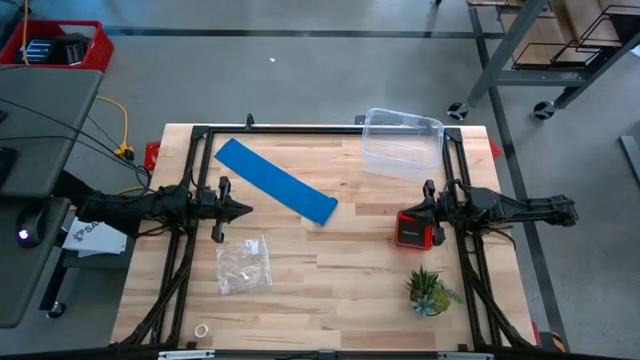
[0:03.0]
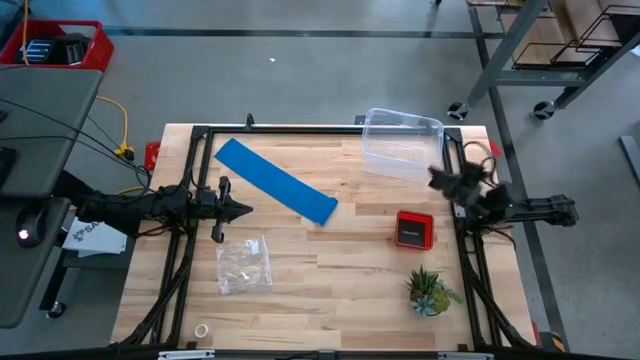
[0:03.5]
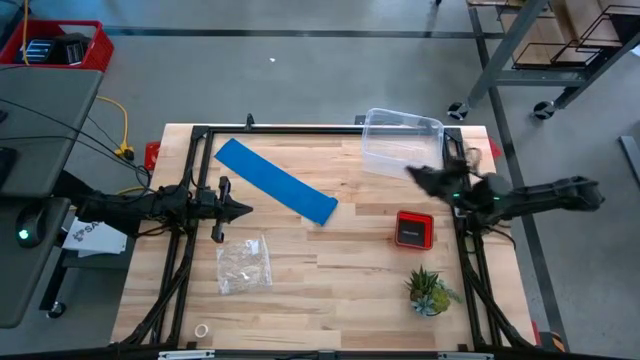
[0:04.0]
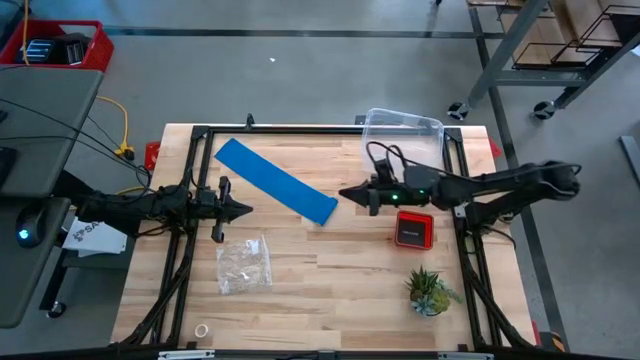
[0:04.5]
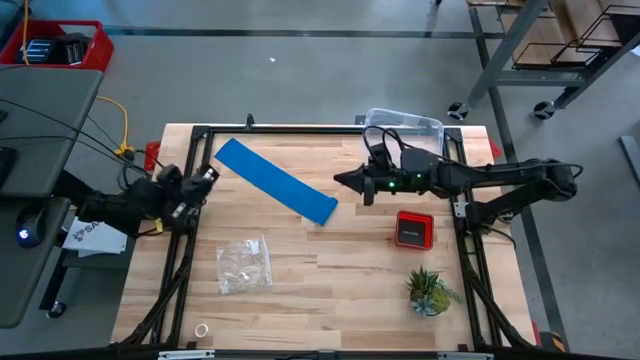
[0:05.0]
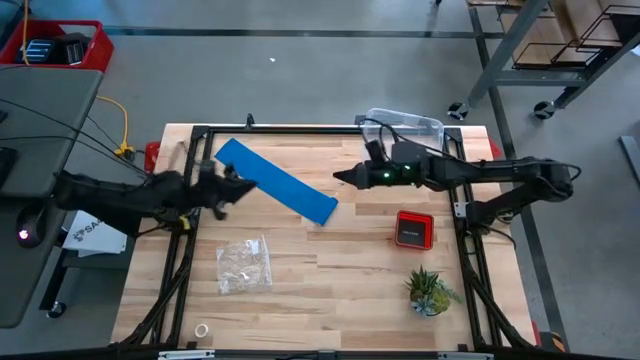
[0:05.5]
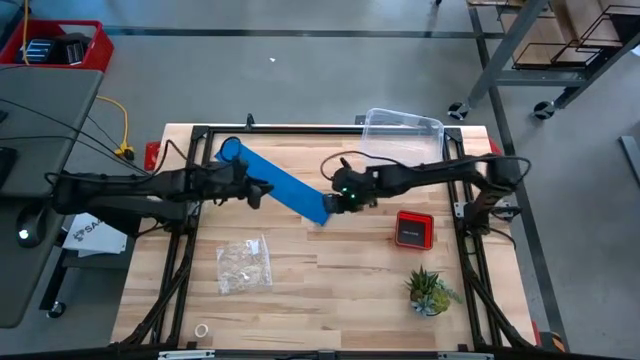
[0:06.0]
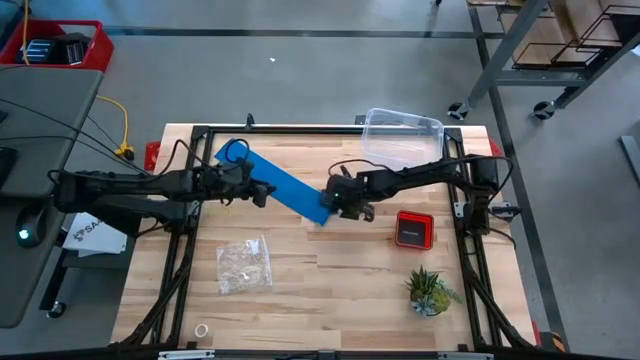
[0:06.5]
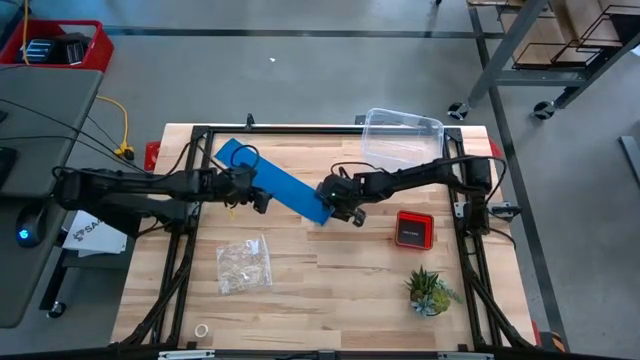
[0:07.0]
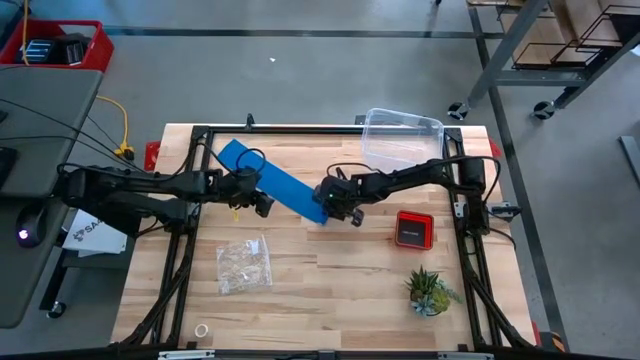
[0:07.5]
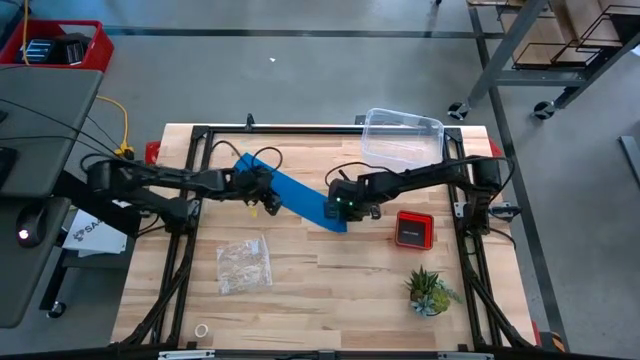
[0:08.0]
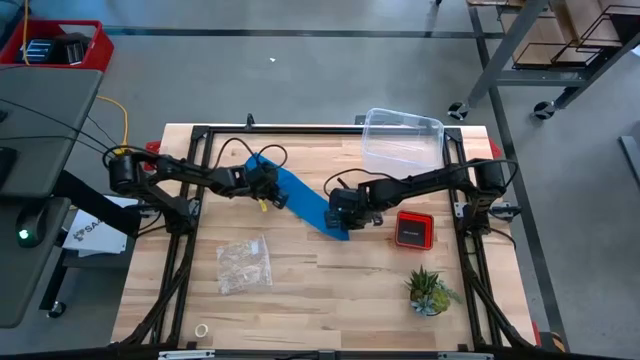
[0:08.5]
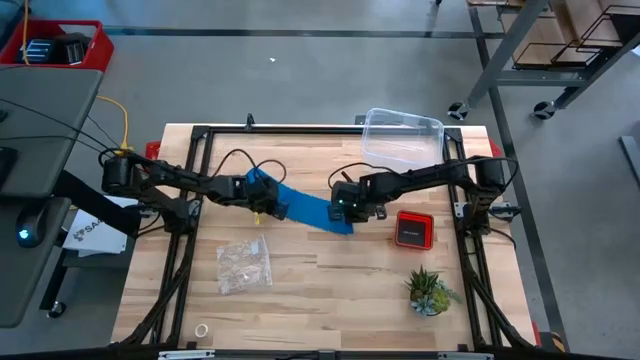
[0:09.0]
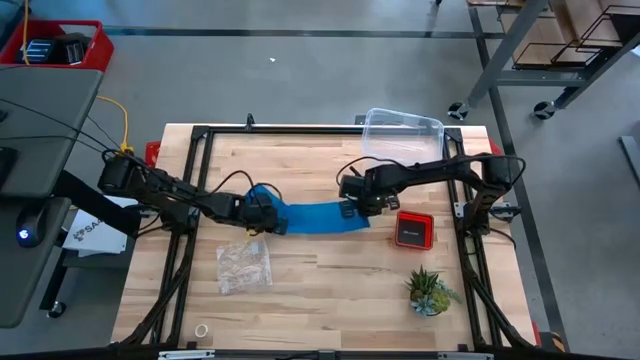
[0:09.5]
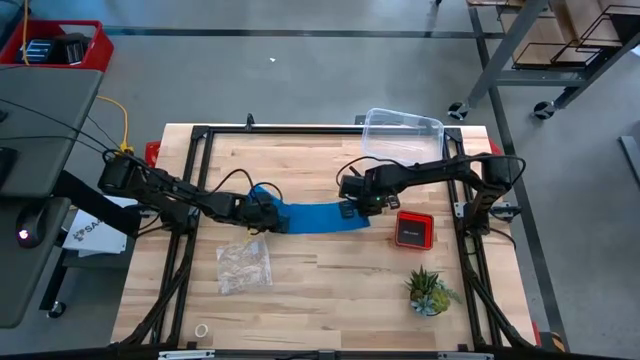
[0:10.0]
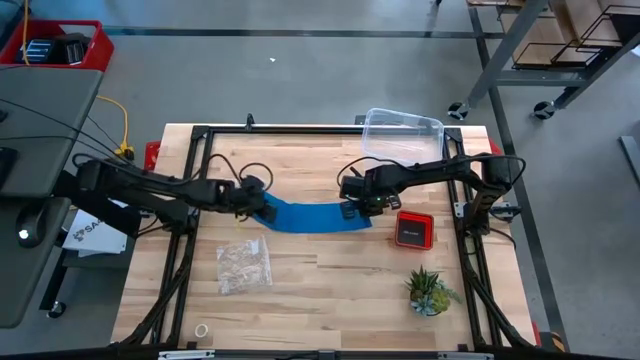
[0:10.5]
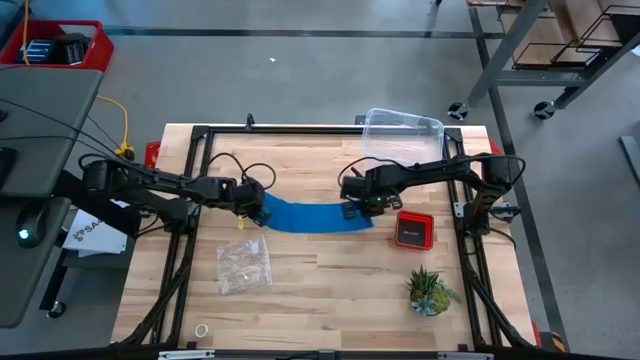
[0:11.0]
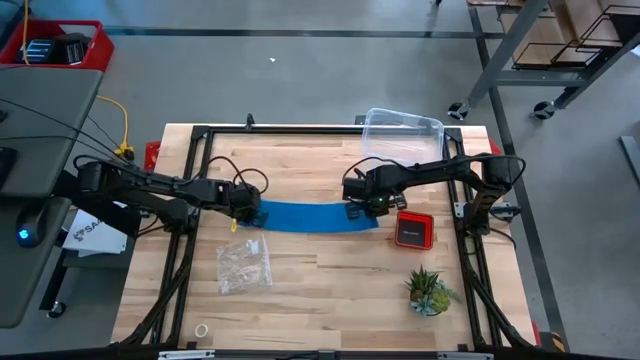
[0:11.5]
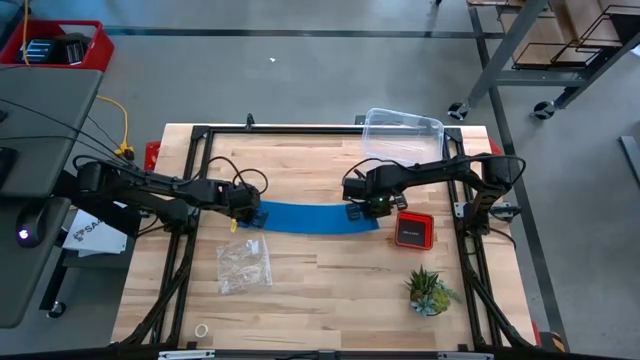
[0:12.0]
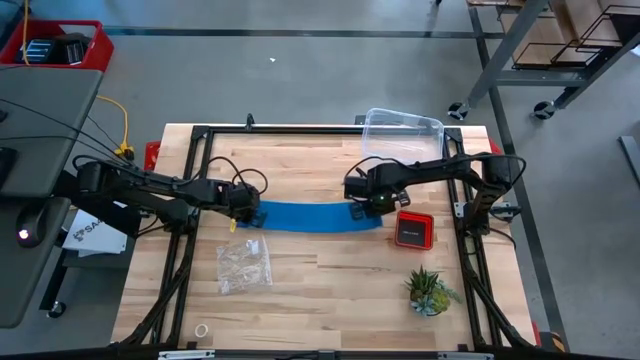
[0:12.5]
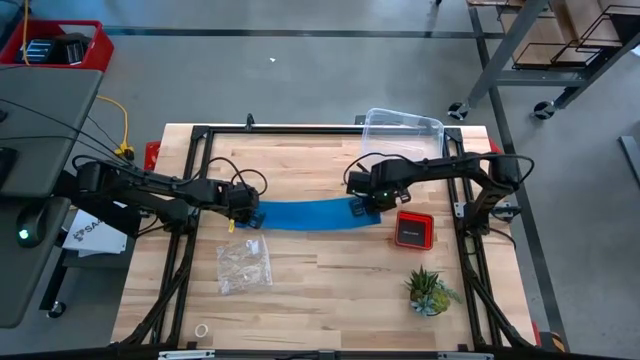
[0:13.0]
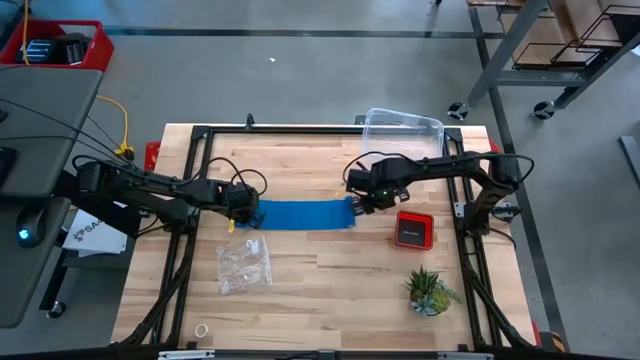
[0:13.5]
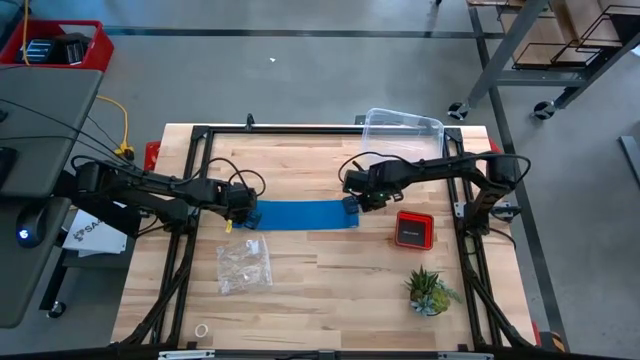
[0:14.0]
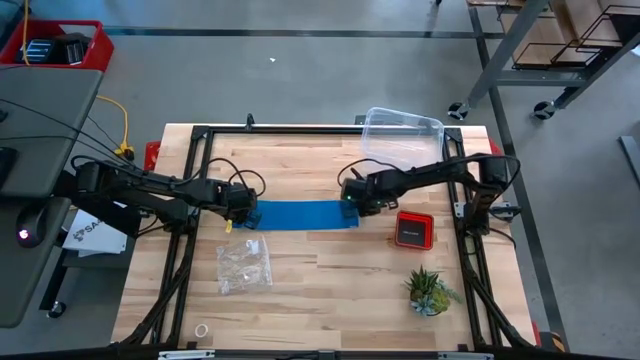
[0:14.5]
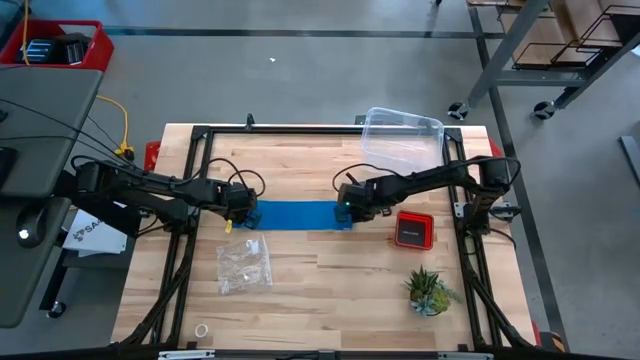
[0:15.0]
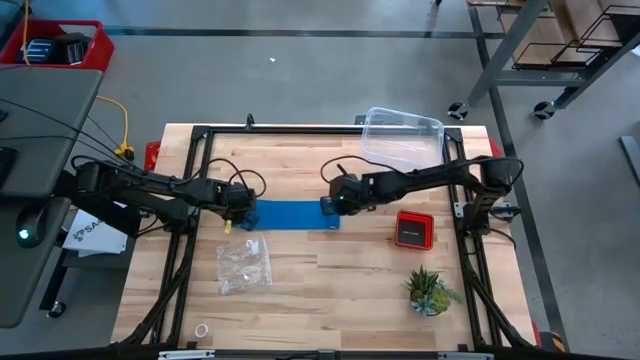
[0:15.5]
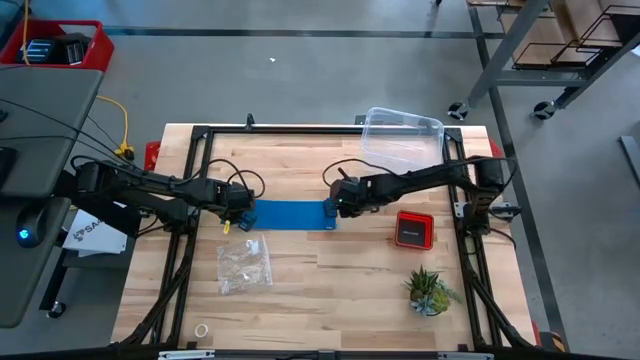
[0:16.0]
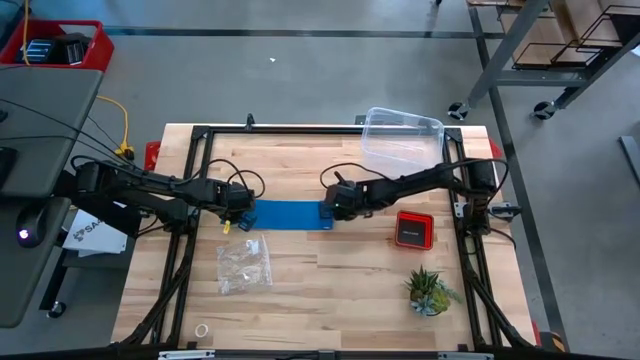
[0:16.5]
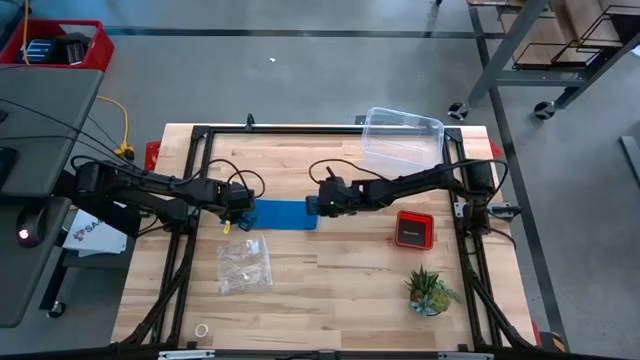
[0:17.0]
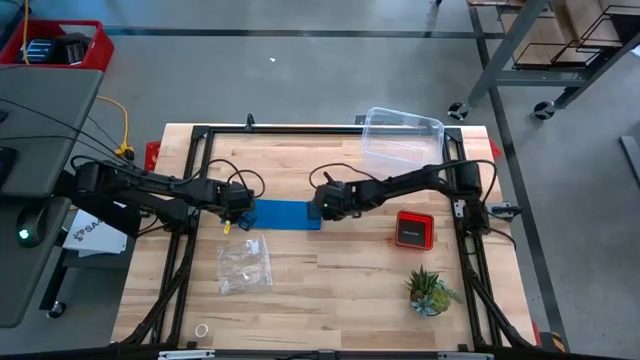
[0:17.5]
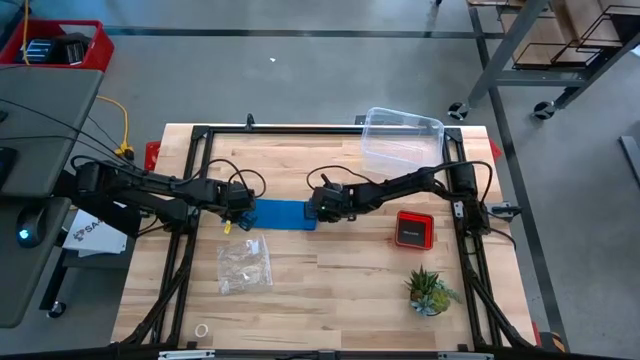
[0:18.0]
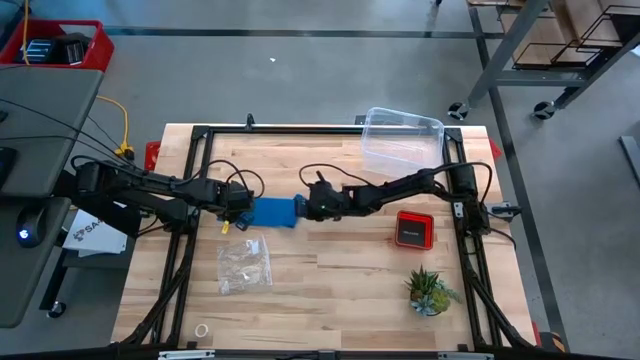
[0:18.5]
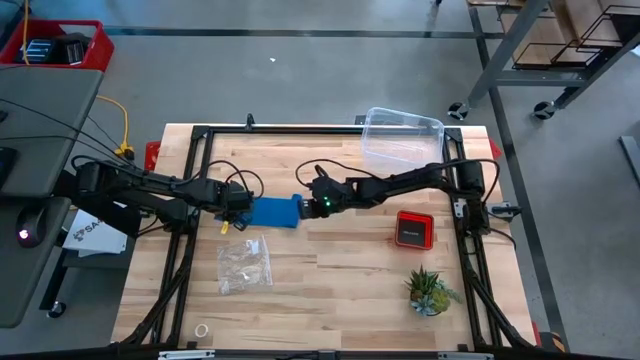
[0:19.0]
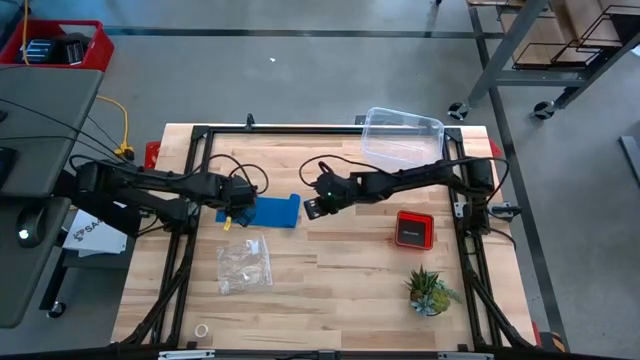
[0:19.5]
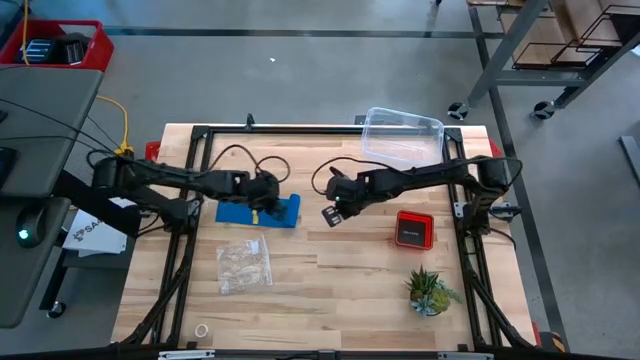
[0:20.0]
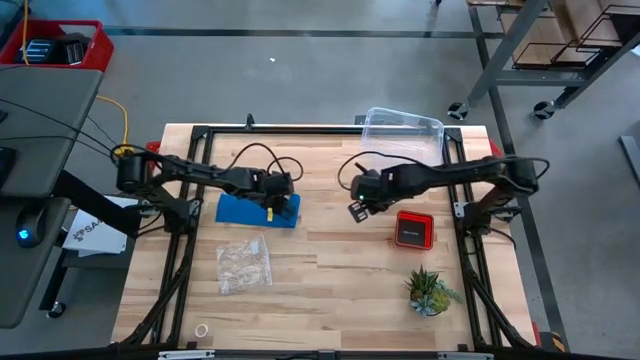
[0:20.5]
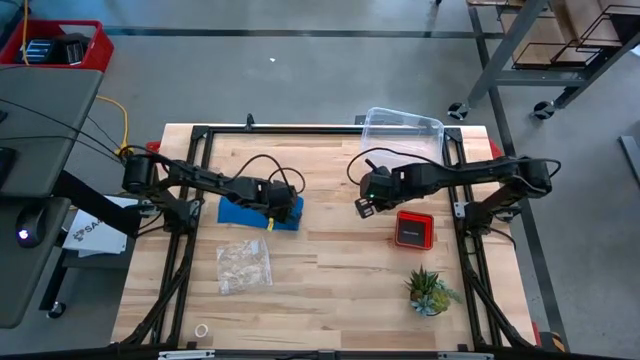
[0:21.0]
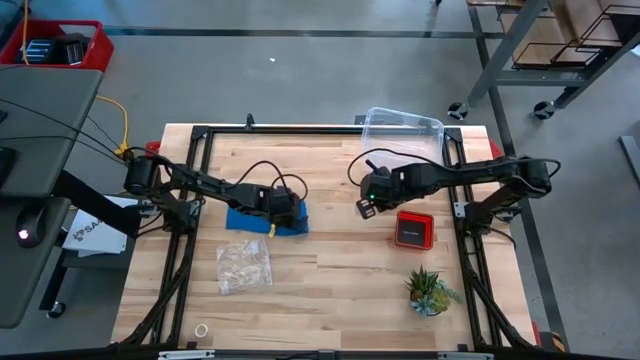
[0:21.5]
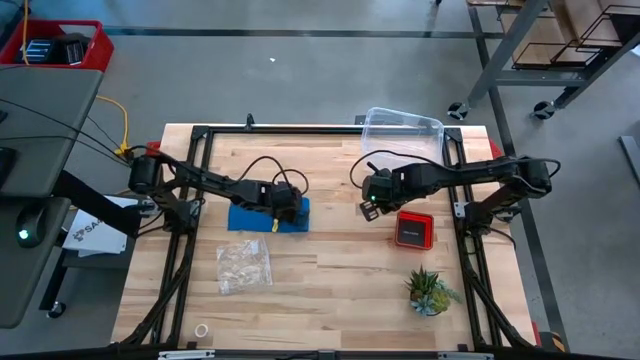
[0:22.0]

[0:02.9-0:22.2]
Task: Roll bandage
Roll the blue bandage
